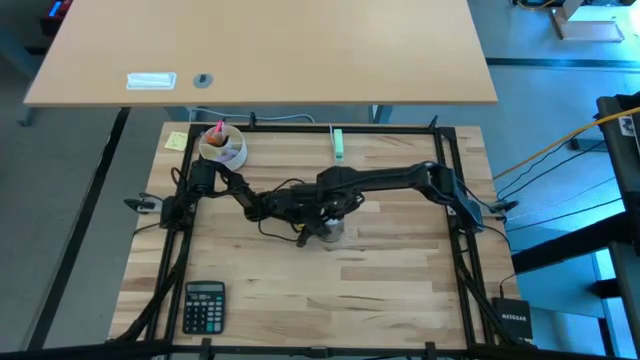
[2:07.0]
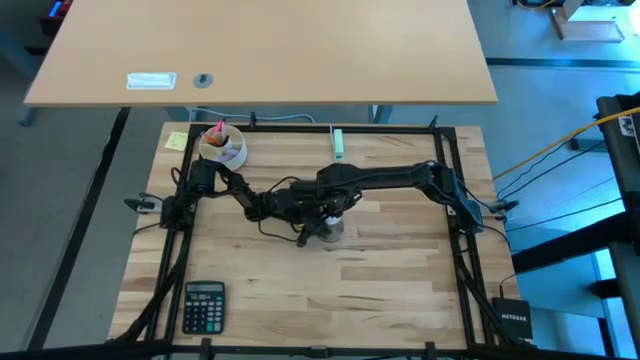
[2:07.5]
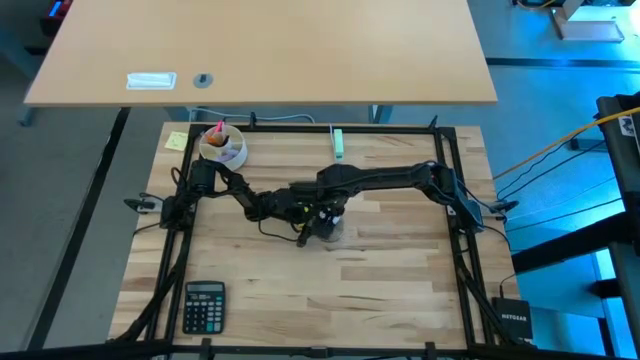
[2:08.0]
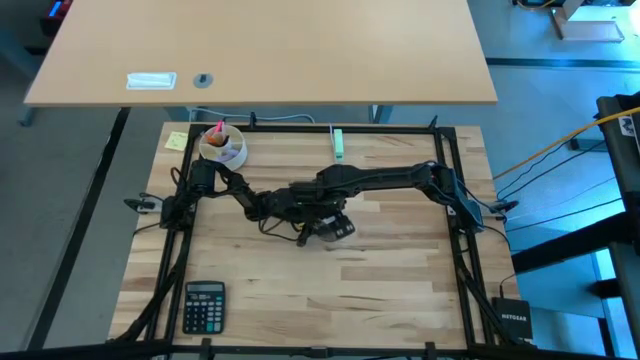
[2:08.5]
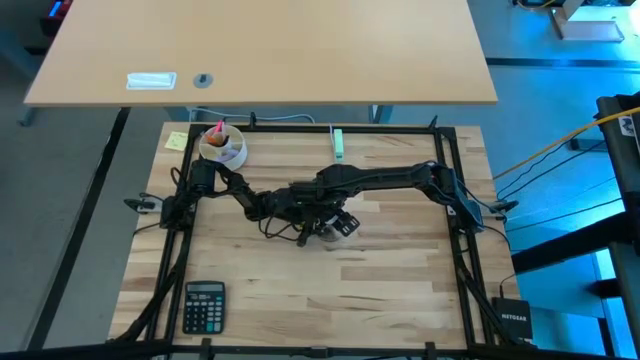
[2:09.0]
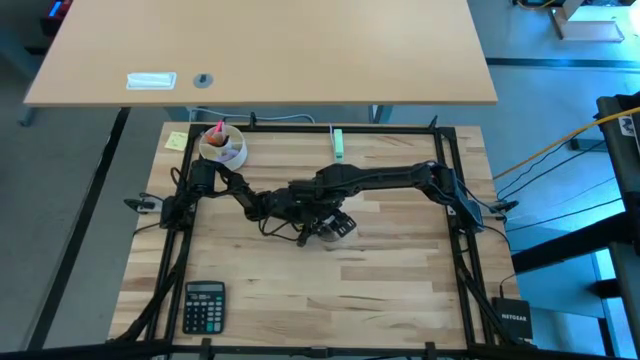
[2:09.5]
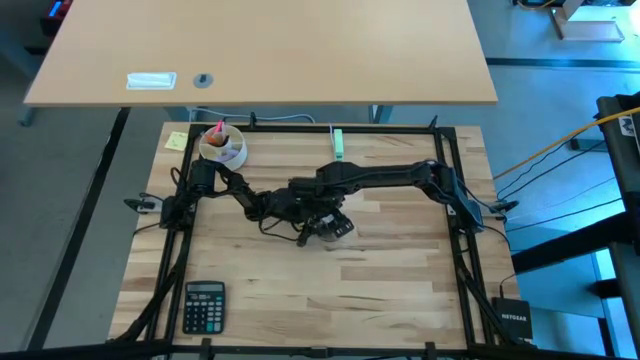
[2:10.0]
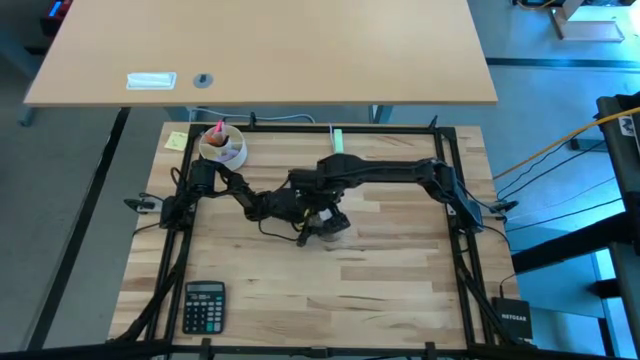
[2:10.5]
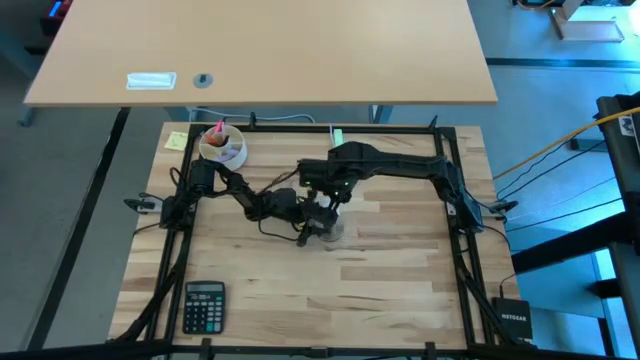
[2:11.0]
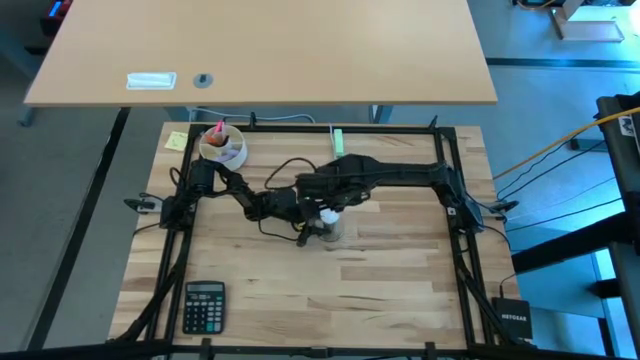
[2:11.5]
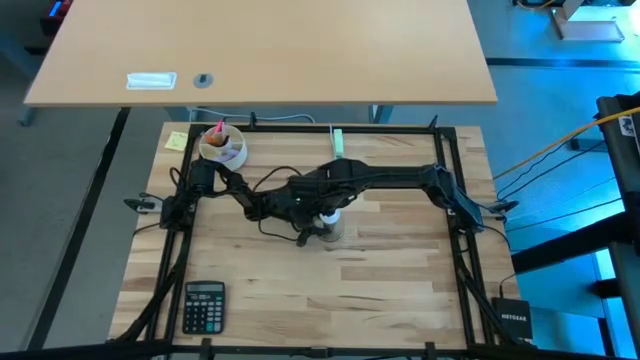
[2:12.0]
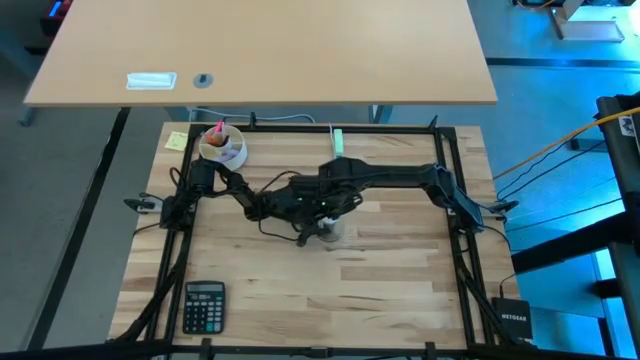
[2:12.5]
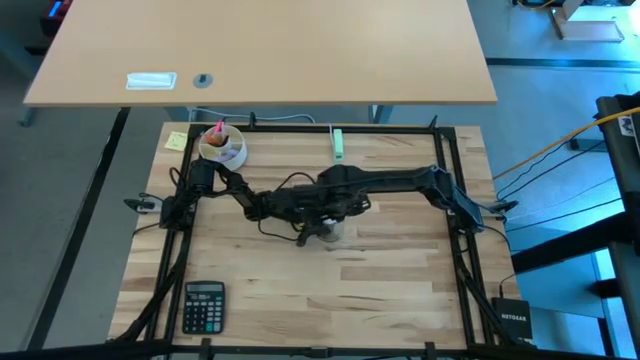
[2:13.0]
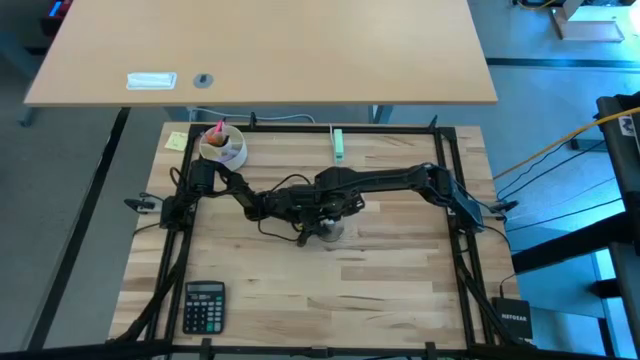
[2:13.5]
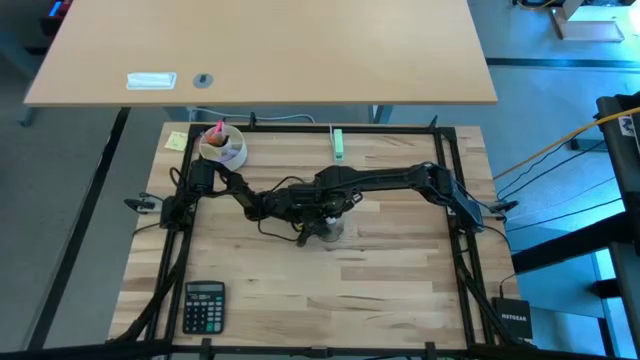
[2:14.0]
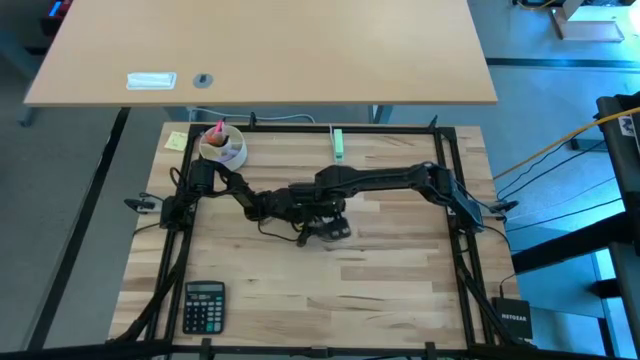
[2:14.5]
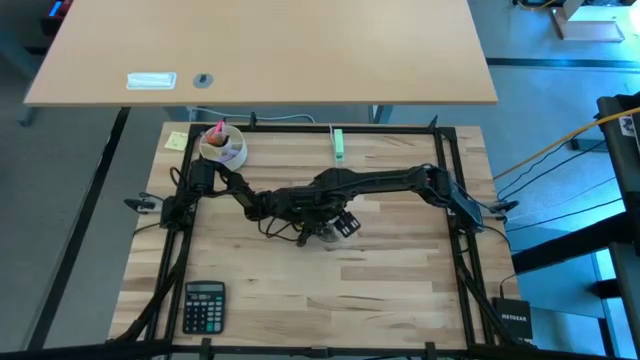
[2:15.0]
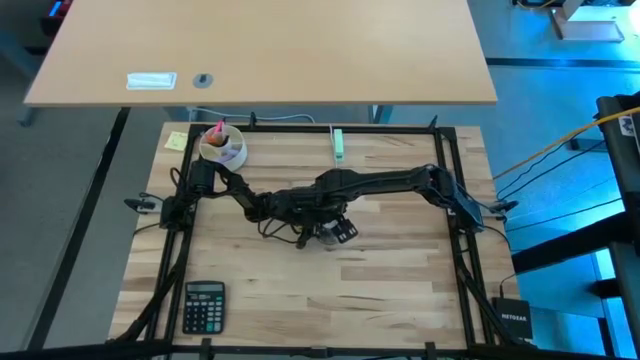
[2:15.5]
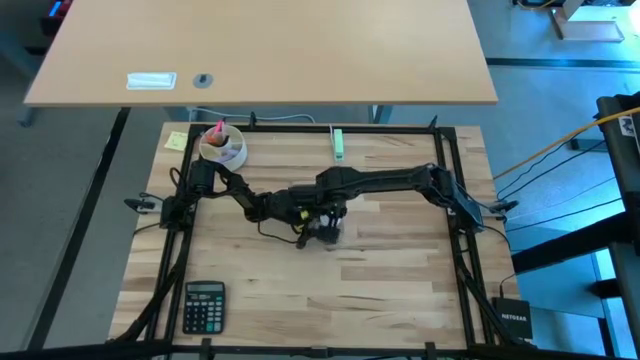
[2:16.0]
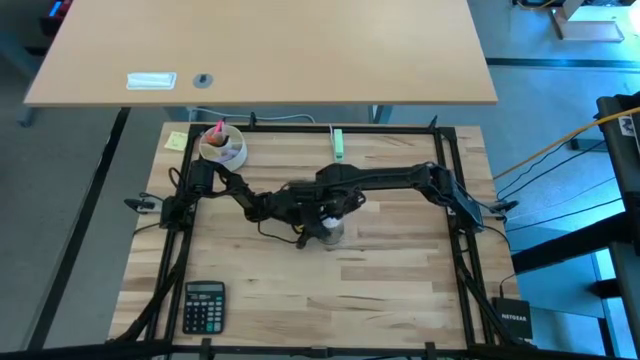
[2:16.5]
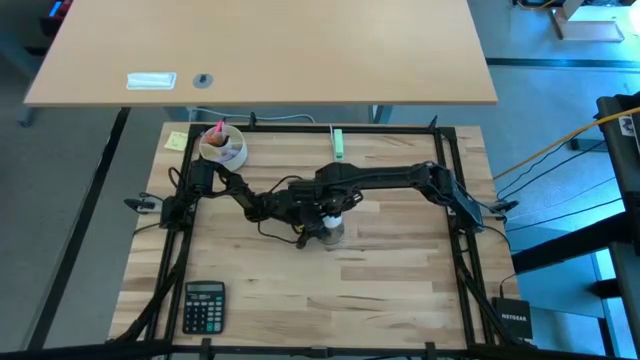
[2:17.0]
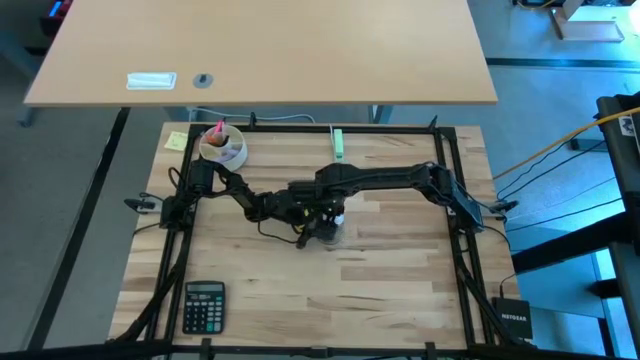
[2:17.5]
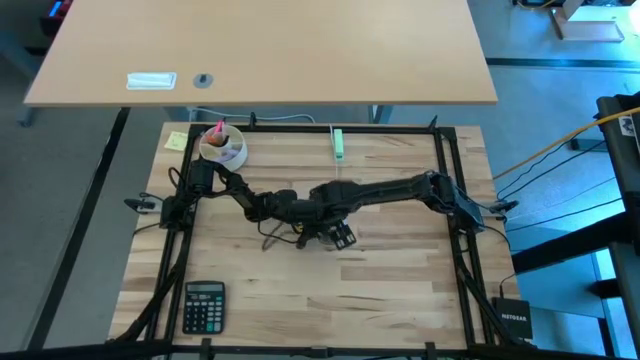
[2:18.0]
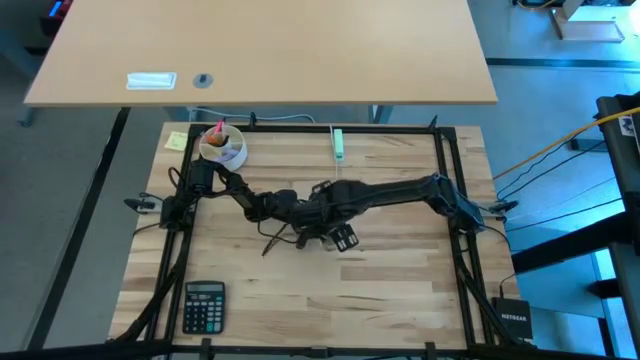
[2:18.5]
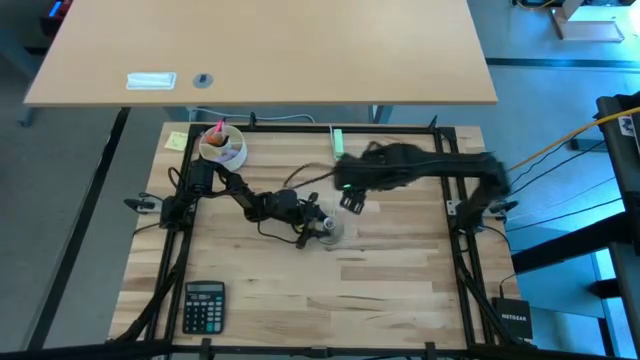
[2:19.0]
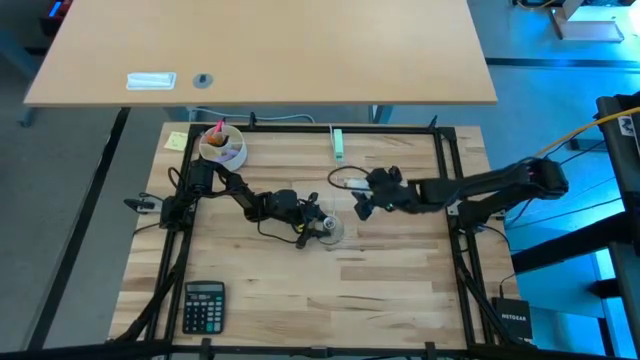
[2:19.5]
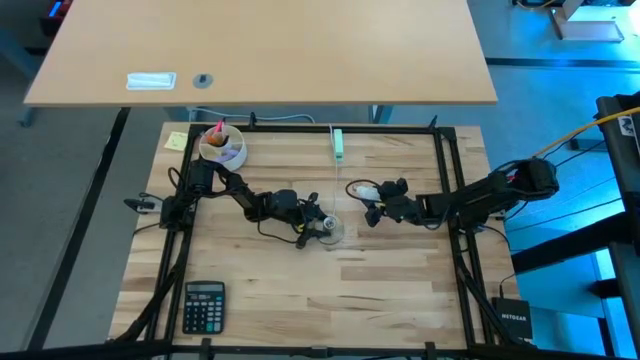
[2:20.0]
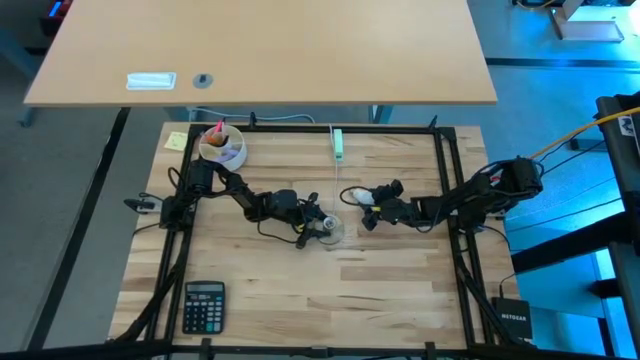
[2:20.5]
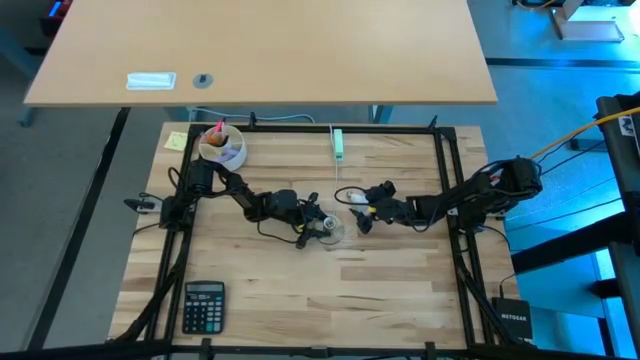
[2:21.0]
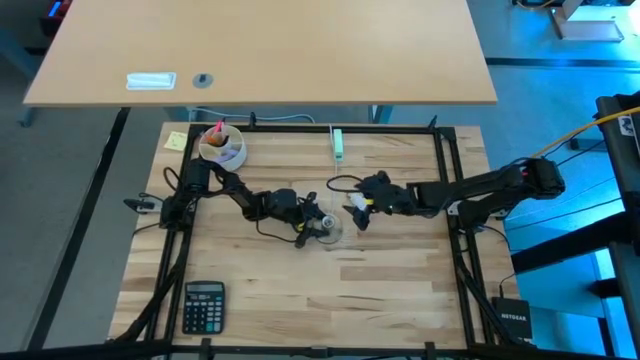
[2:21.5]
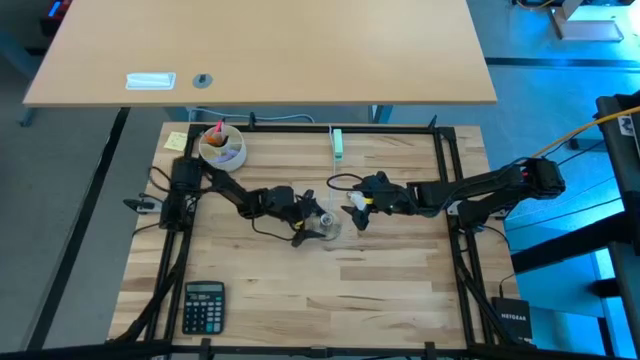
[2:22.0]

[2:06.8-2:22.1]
Task: Screw lightbulb
Remove the lightbulb from the lamp

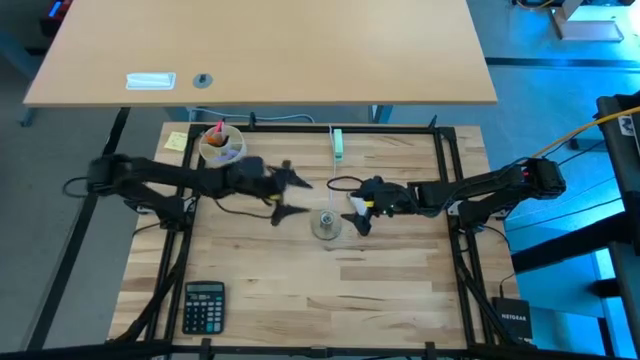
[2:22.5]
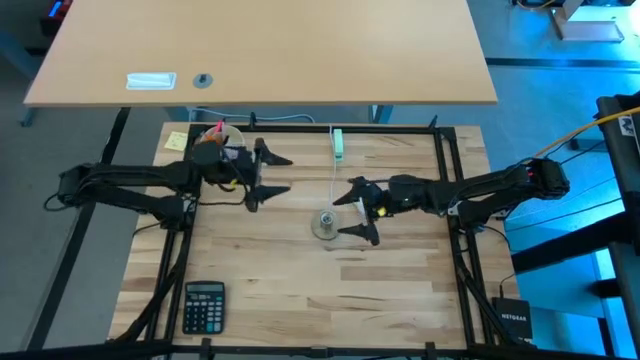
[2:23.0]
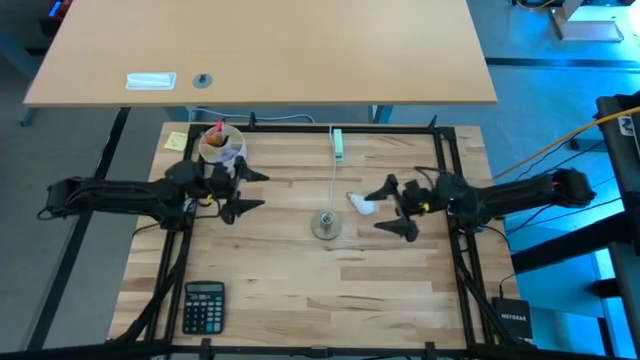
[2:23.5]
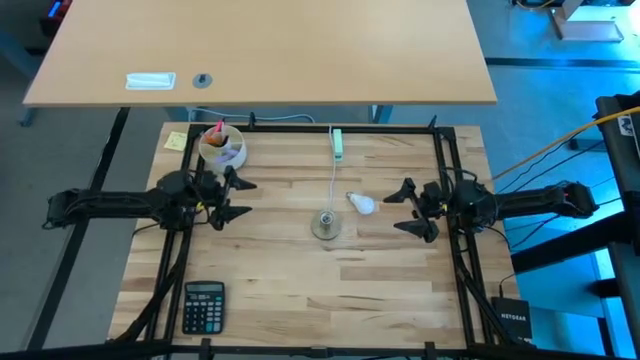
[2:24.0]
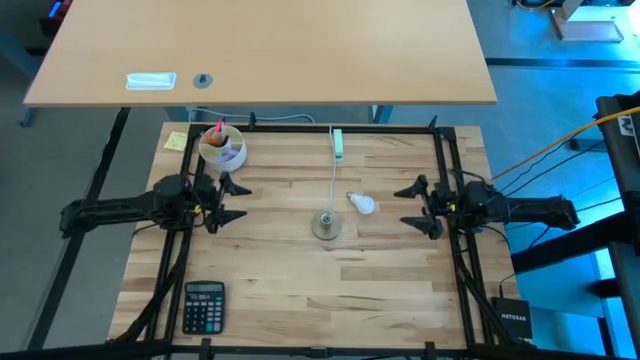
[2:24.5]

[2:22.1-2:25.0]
Return to Home Position

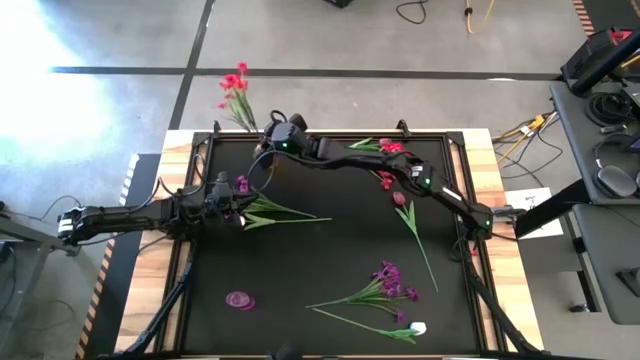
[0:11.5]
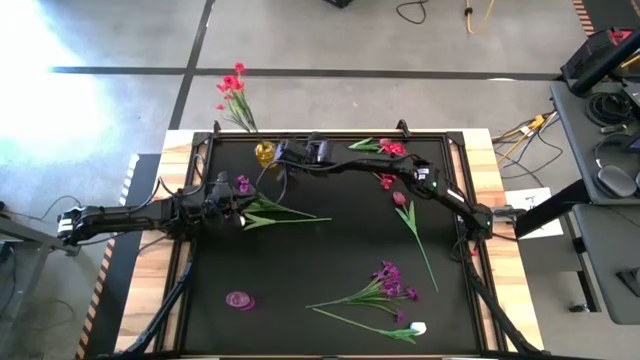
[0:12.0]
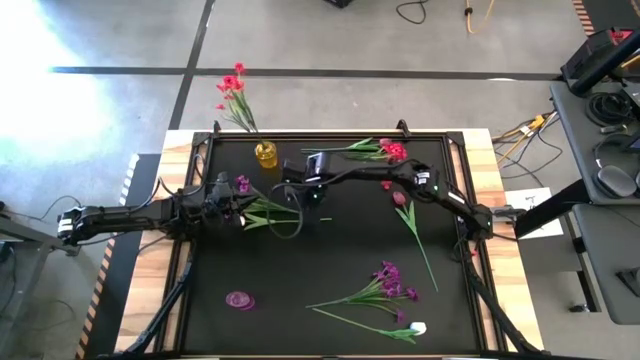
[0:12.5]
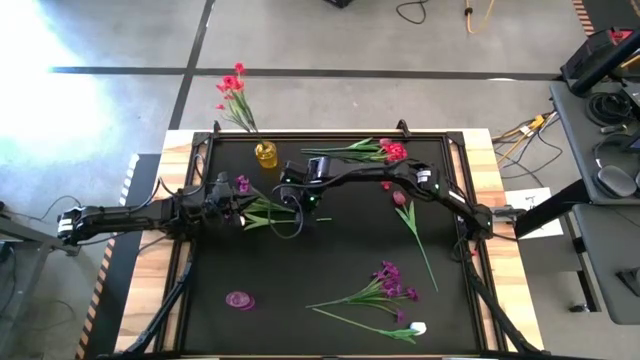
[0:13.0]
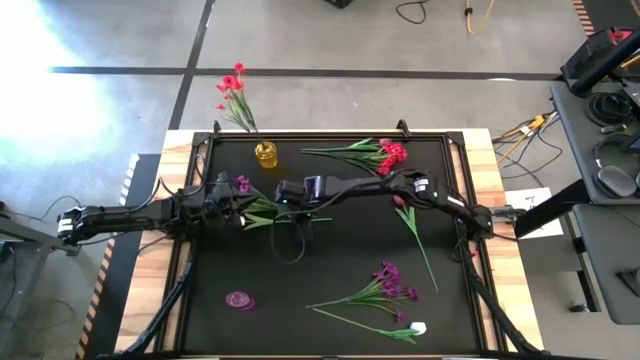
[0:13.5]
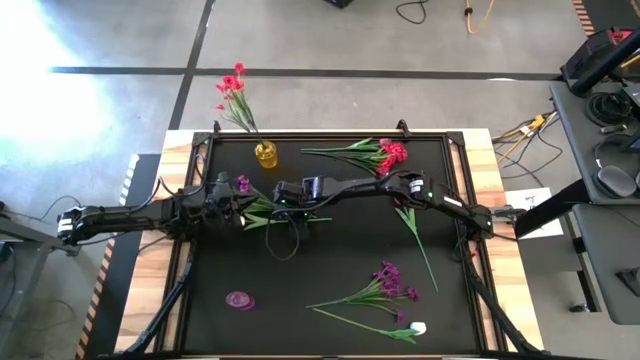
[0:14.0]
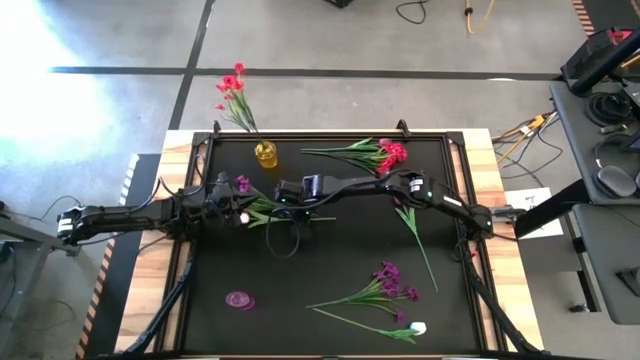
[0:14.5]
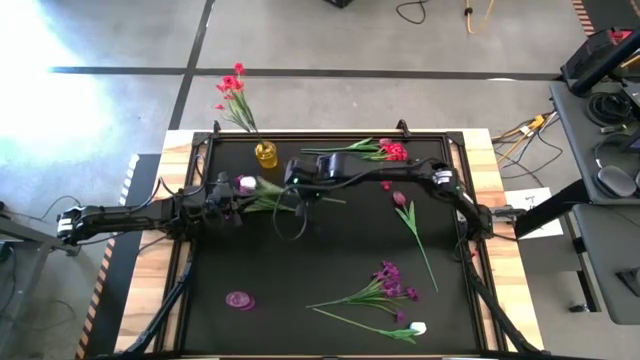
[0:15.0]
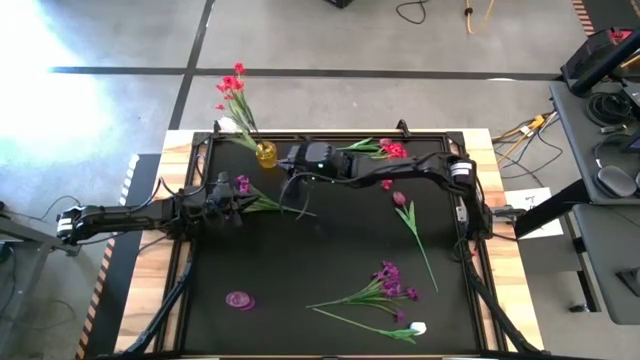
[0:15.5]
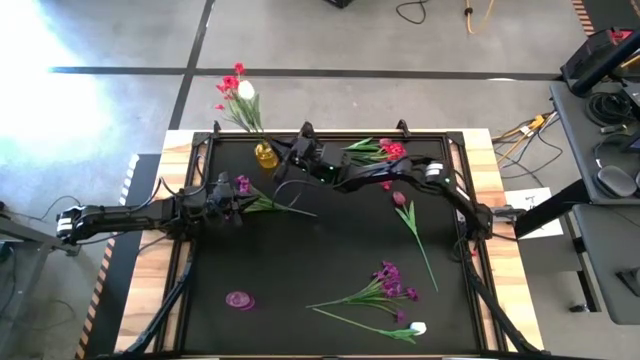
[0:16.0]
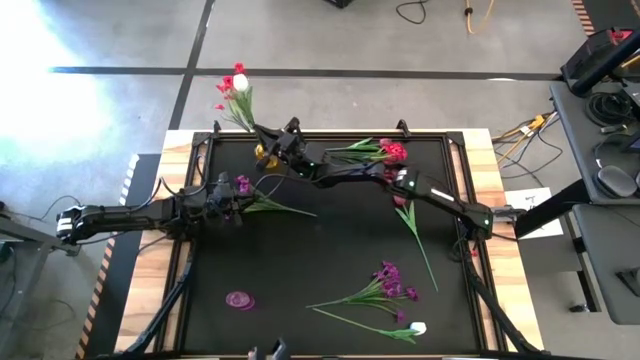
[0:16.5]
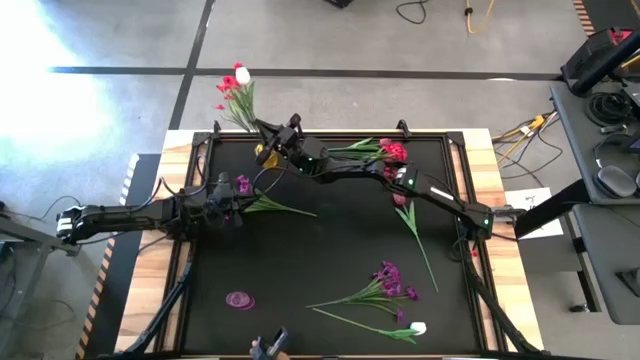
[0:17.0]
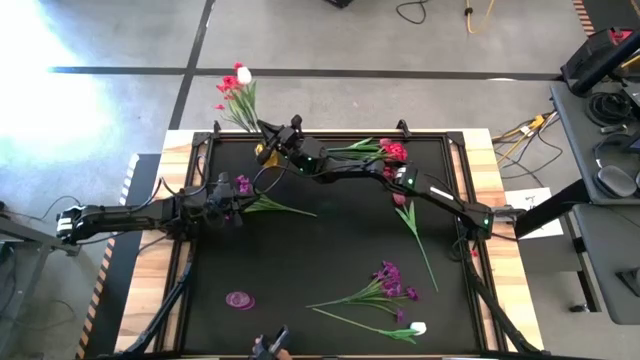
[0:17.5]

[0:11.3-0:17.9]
Task: Sort flowers into vase by color
Put the top white tulip into the yellow vase
